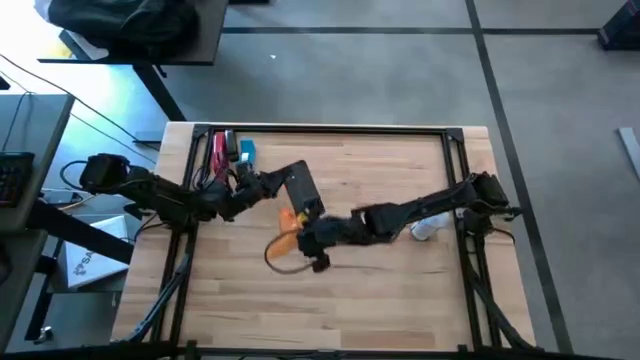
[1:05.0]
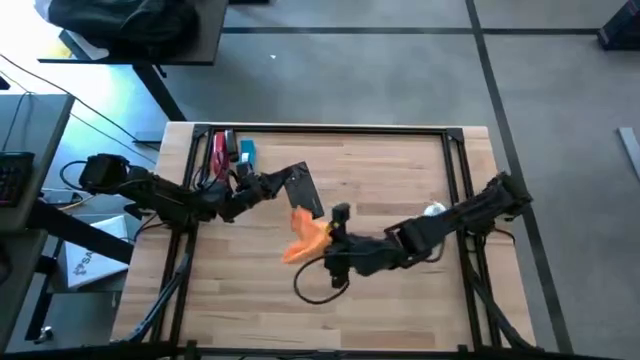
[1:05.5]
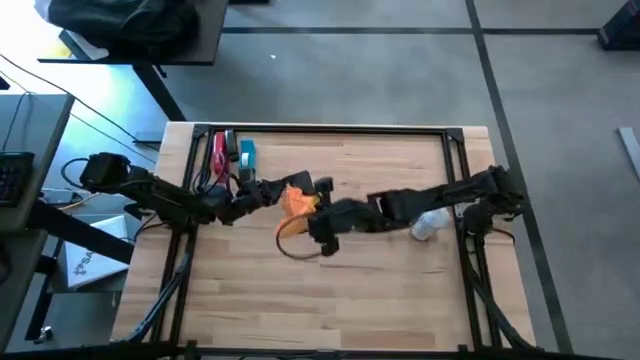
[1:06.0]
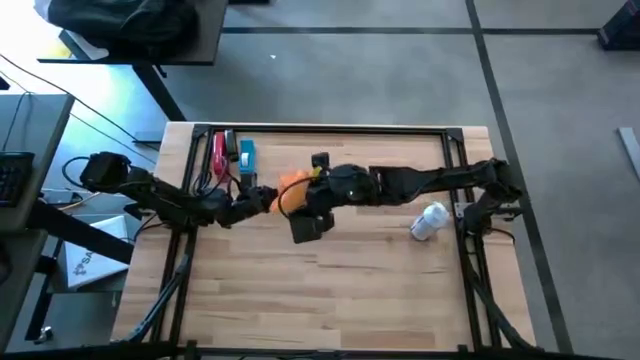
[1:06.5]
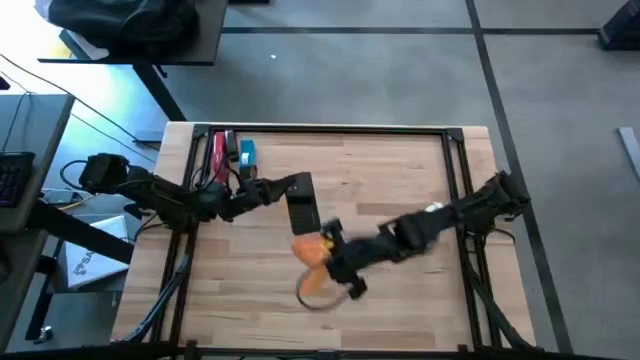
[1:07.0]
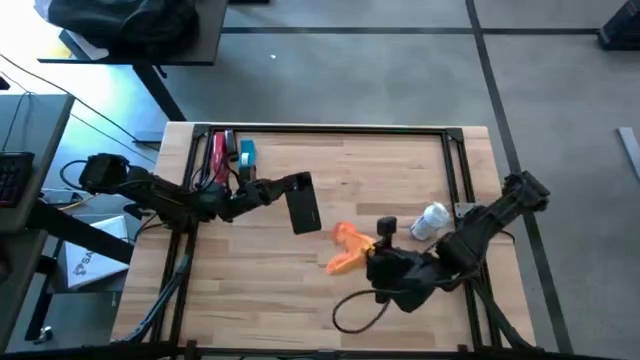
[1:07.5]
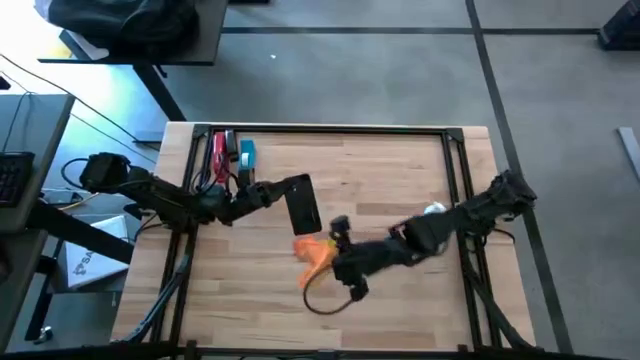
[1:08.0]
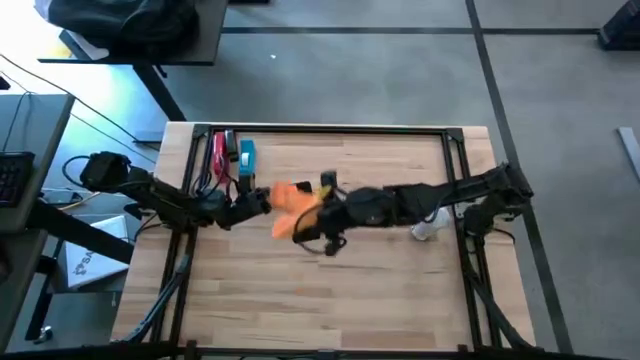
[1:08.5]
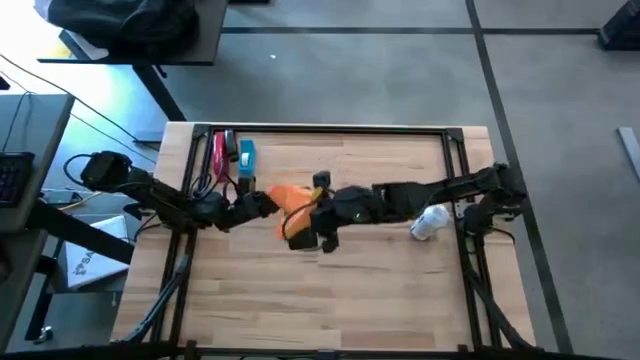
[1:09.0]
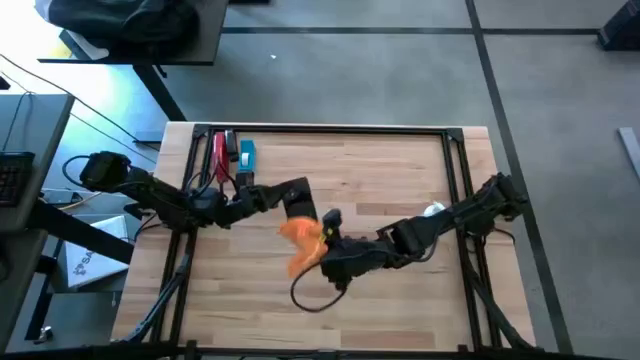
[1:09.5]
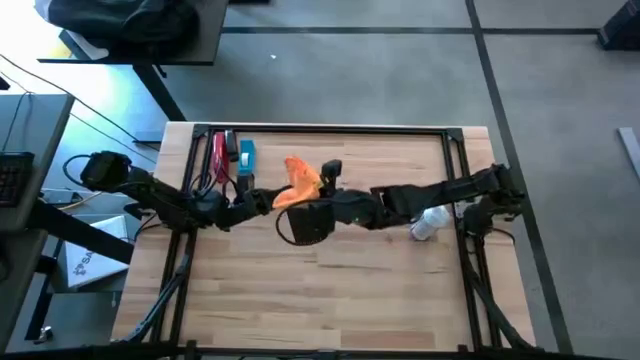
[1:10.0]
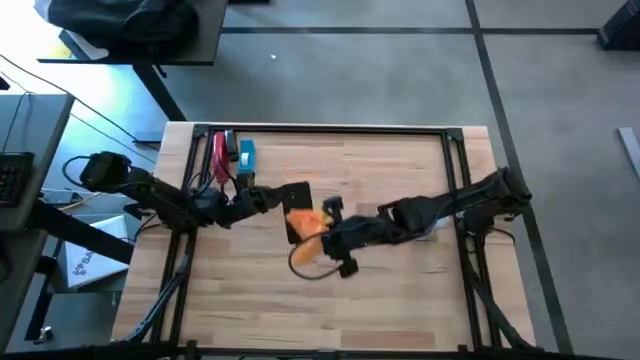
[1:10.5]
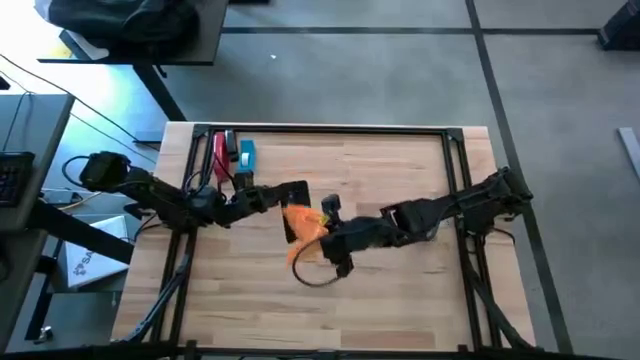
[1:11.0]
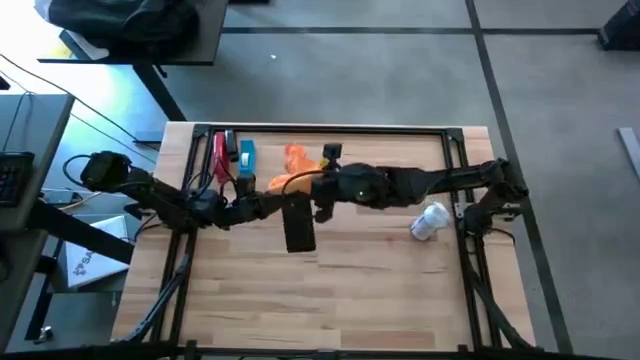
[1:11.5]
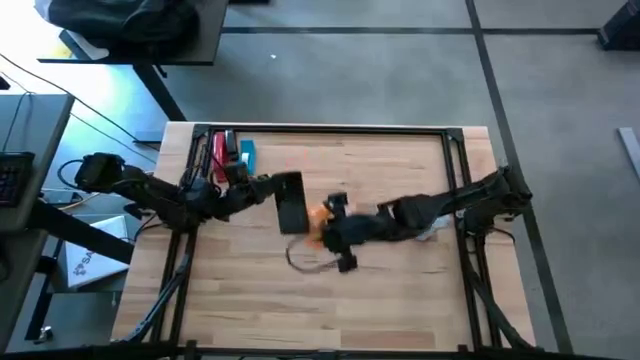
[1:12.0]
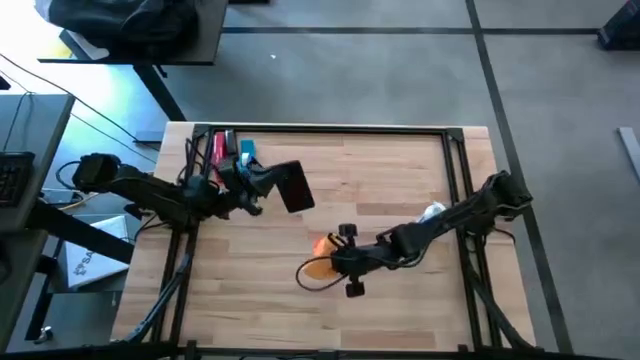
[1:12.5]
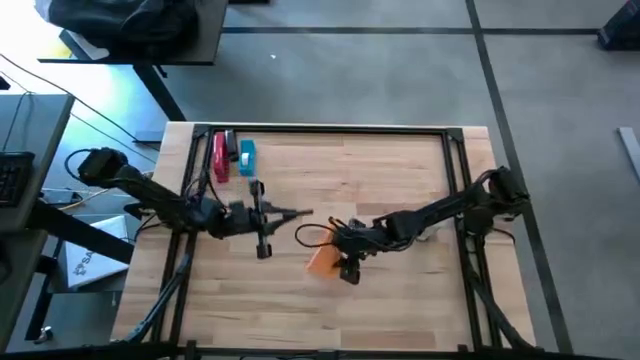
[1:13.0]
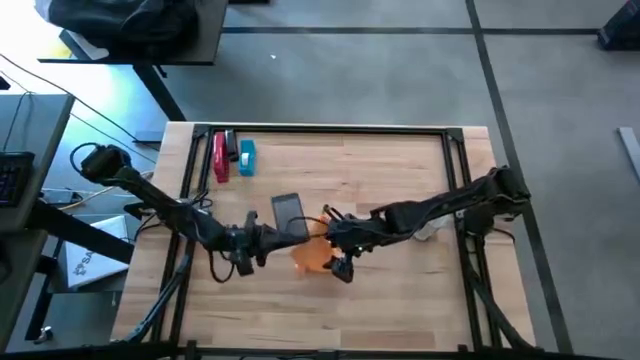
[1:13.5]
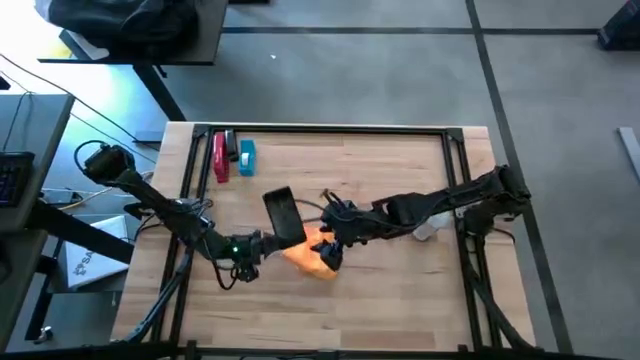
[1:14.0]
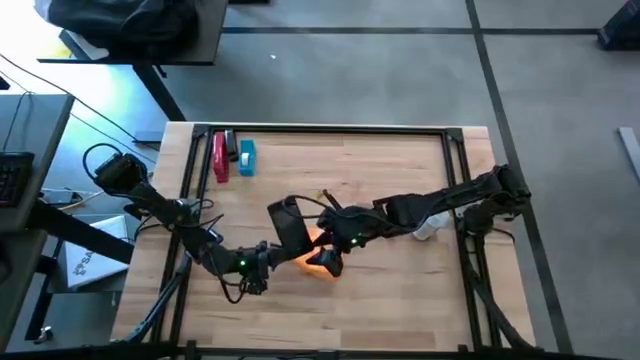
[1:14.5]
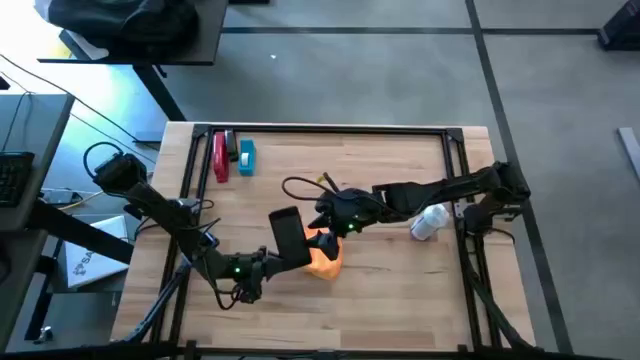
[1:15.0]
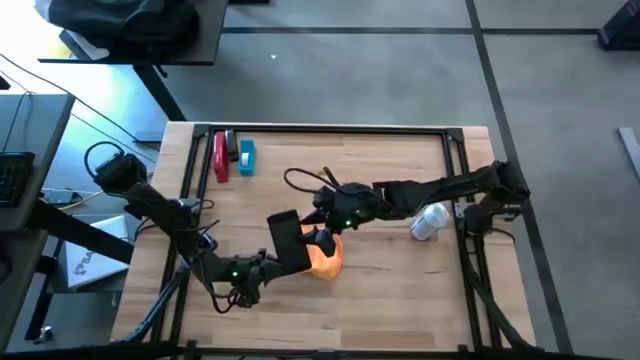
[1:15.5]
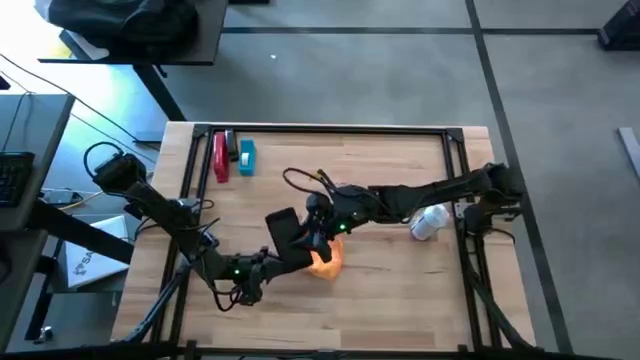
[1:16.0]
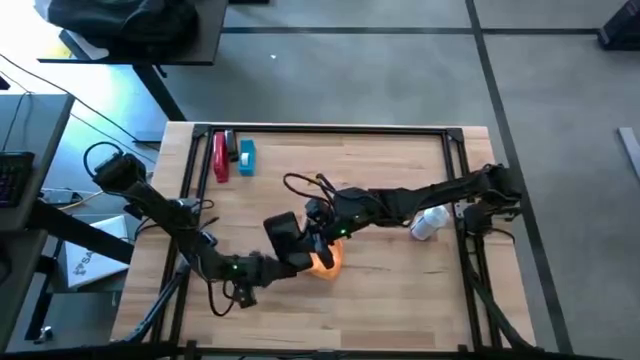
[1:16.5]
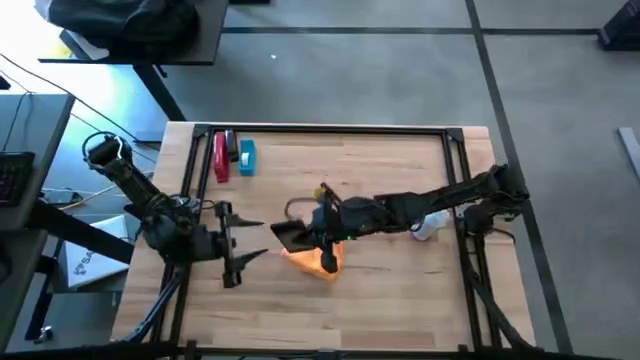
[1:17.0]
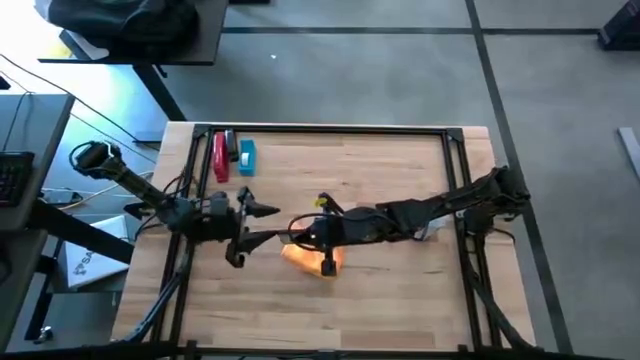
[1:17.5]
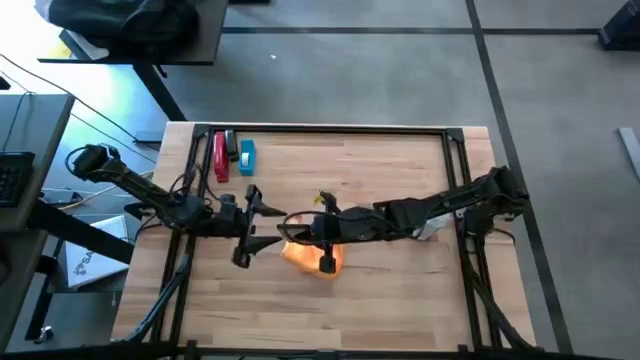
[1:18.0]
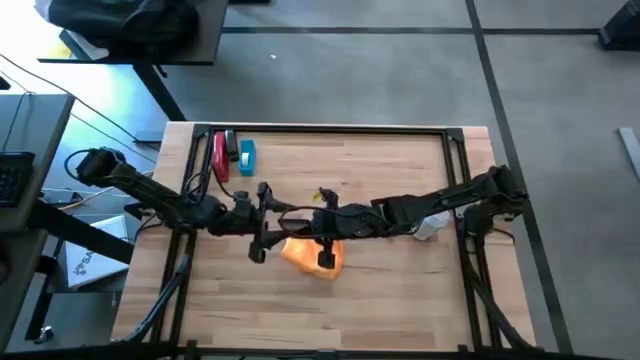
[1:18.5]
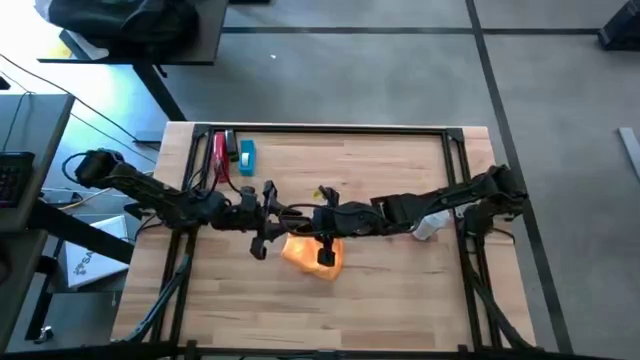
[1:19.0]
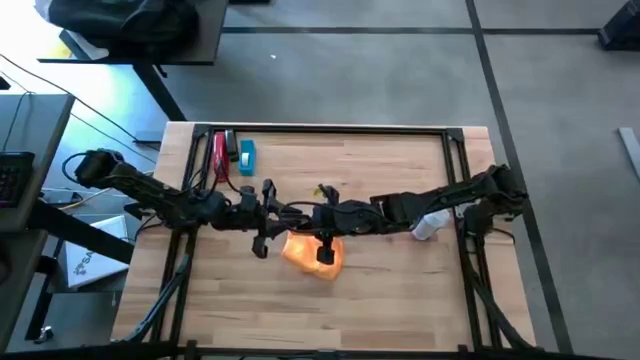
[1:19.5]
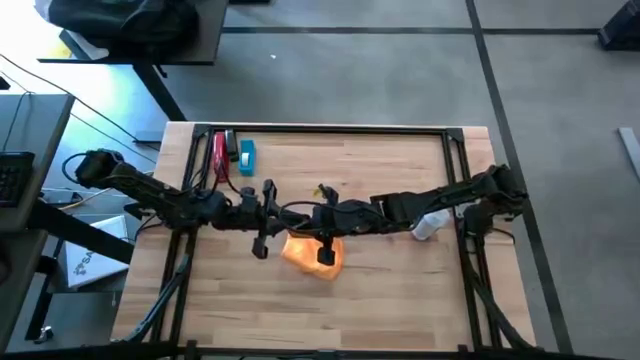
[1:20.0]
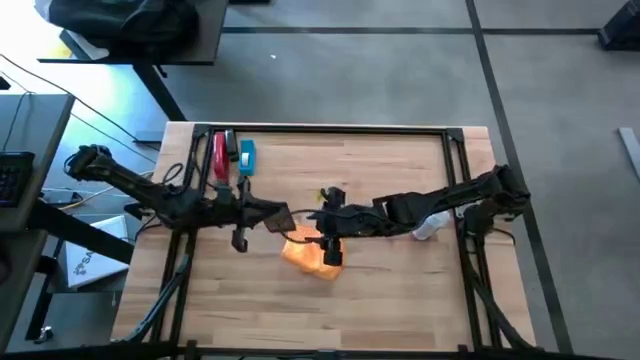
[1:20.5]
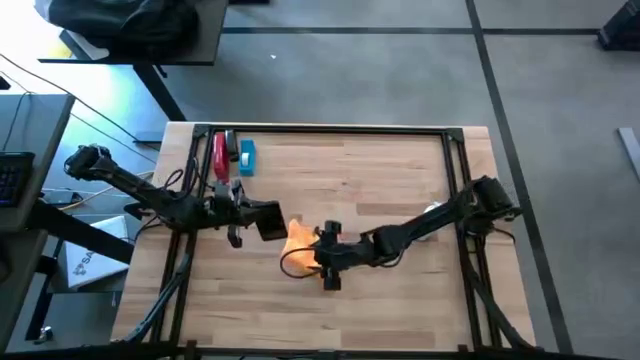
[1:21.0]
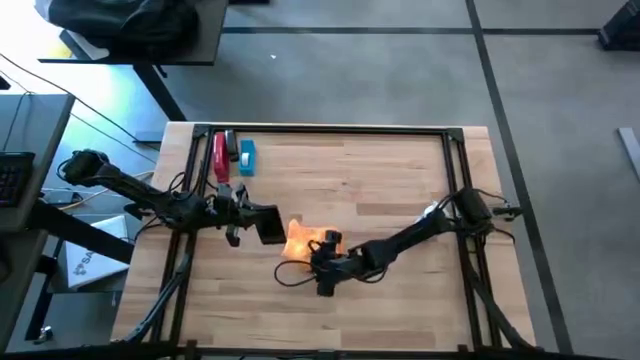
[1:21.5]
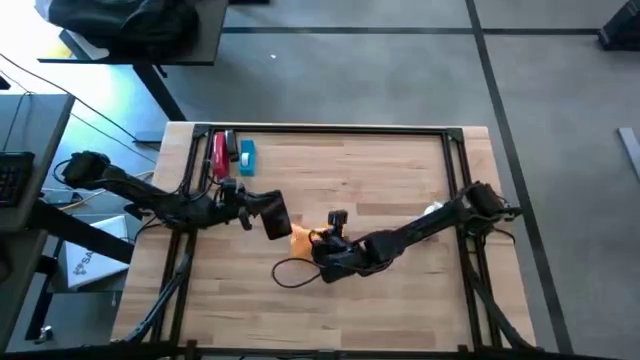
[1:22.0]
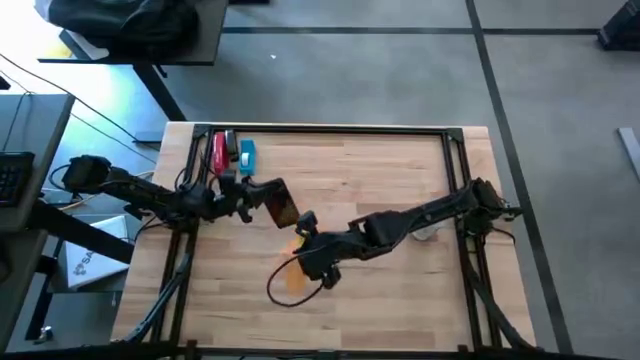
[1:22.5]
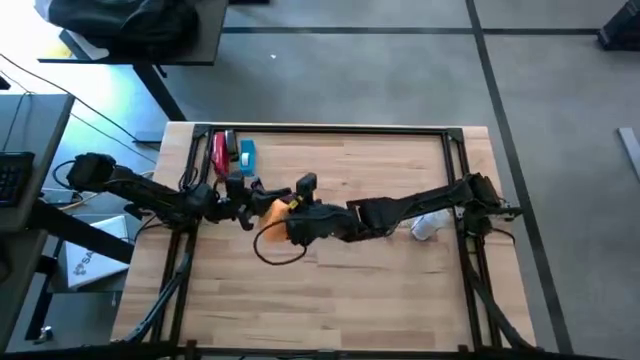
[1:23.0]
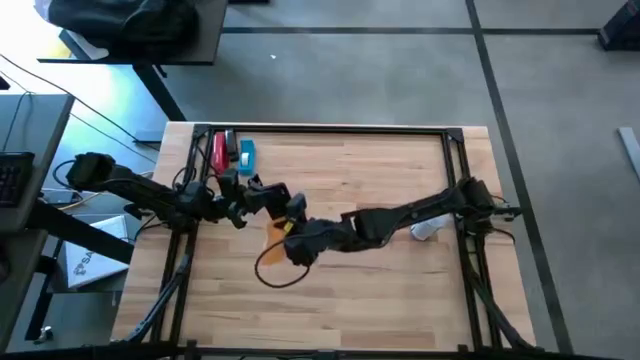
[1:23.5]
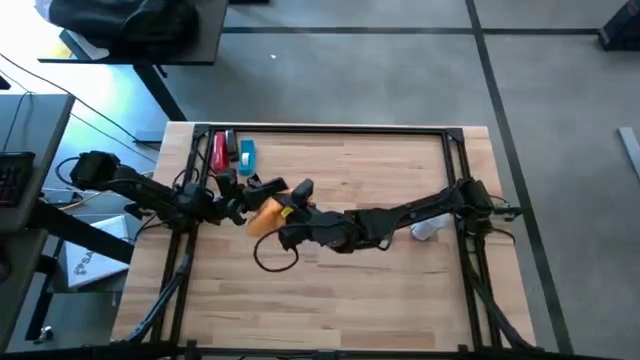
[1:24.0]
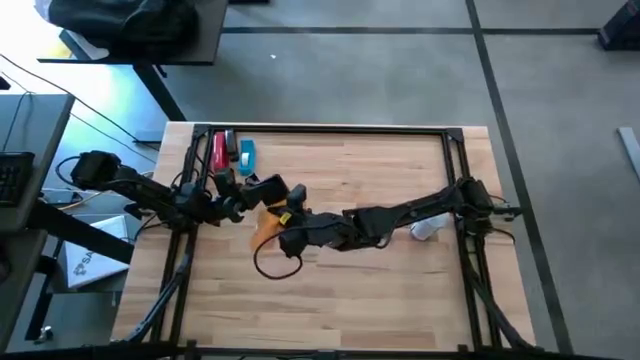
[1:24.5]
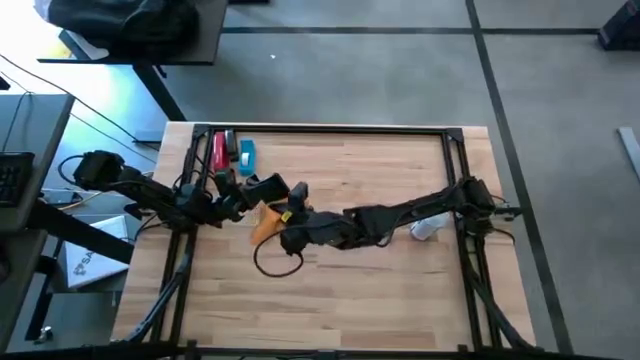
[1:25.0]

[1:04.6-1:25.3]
Task: Apply microfiber cloth
Wipe the front and back of the black cellphone using the yellow microfiber cloth
